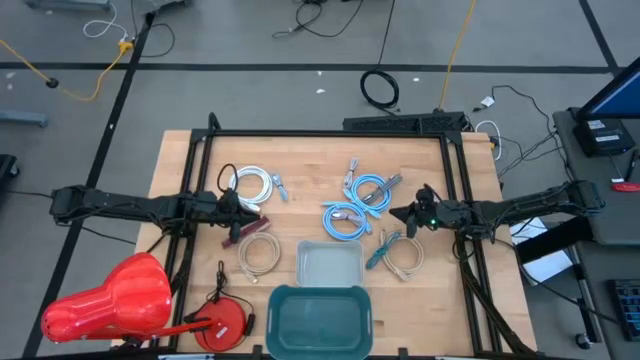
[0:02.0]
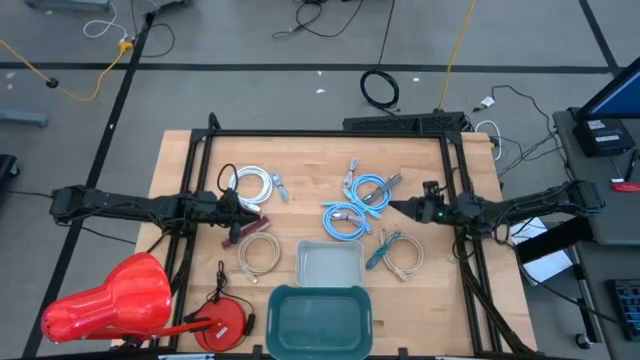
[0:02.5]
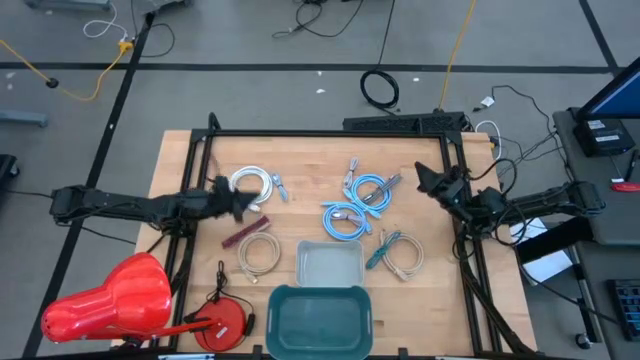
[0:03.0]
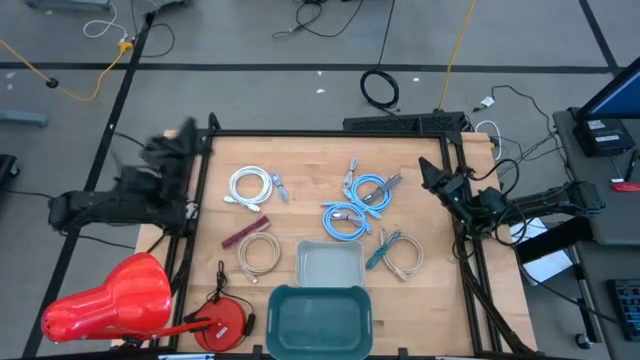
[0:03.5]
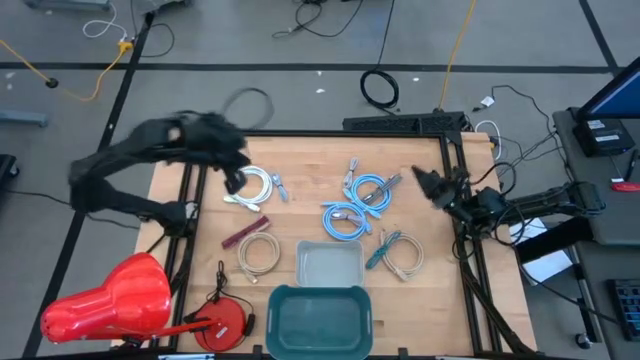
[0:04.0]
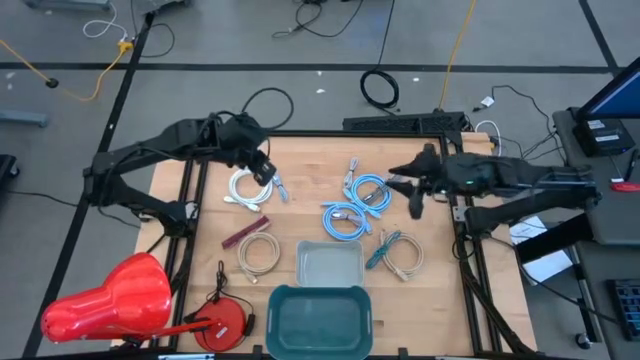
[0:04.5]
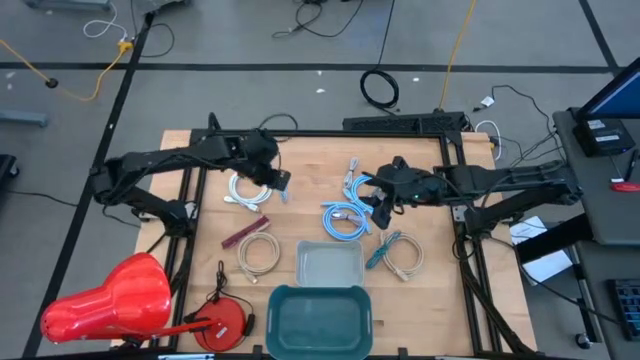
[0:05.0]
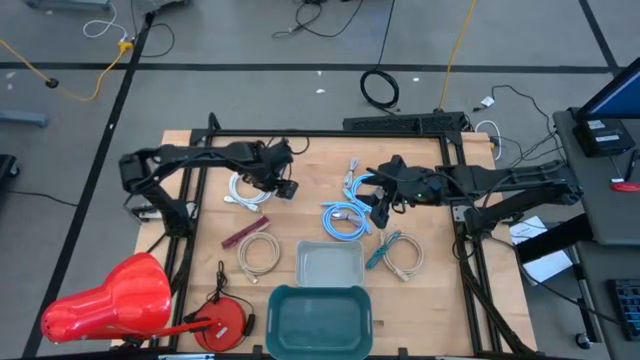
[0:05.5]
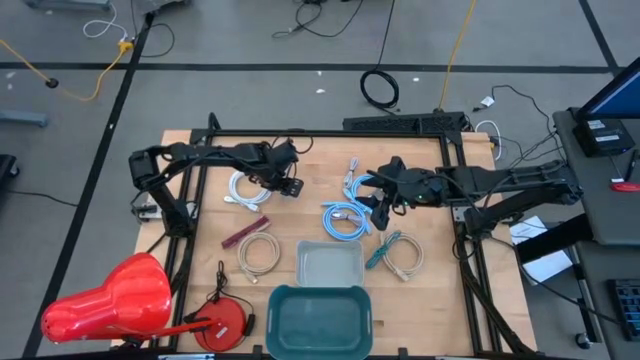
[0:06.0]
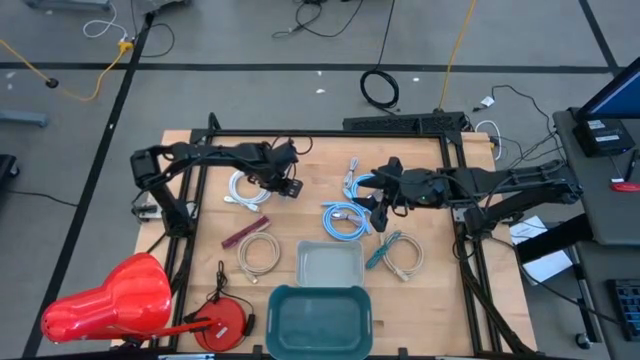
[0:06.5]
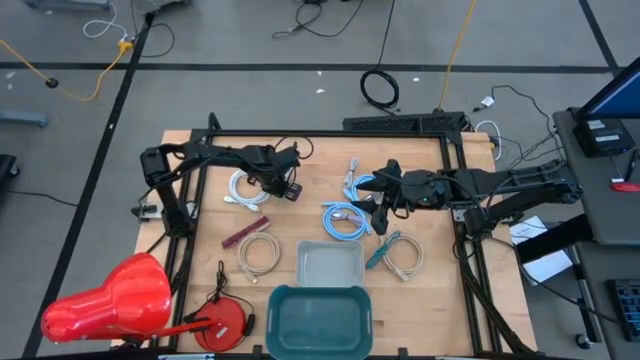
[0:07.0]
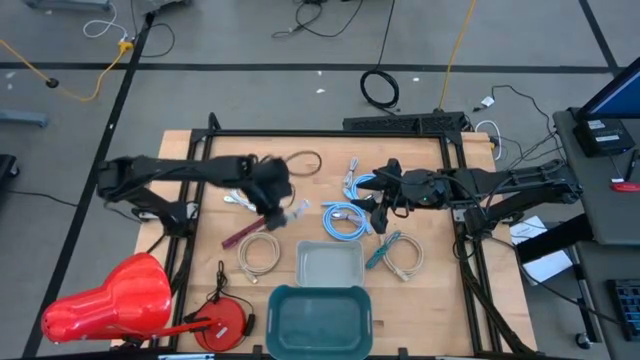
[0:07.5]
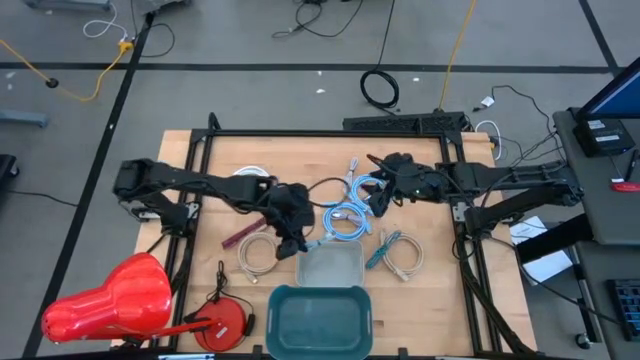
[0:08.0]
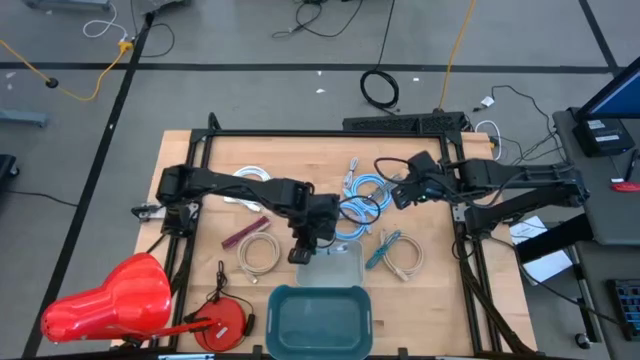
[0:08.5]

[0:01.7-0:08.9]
Task: Pick & Place USB Port
Put the light blue charger cable into the gray bin

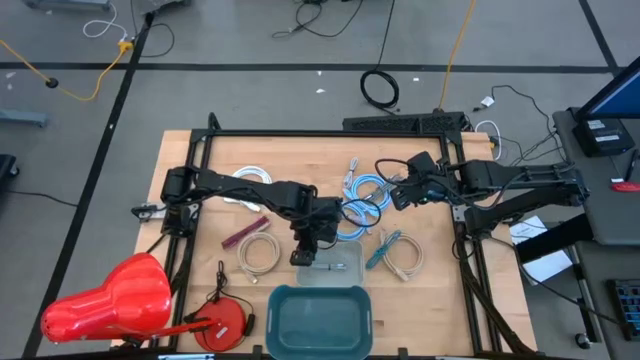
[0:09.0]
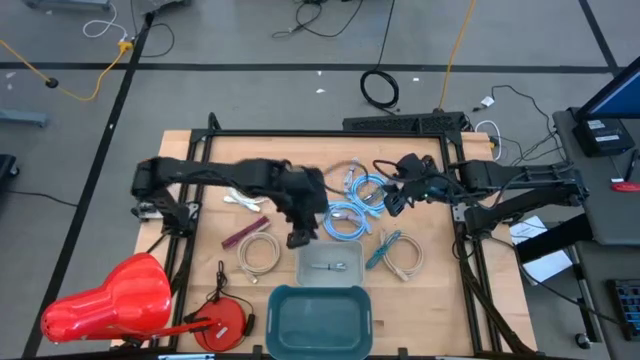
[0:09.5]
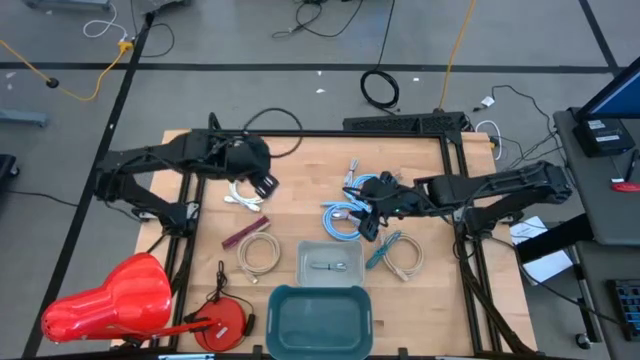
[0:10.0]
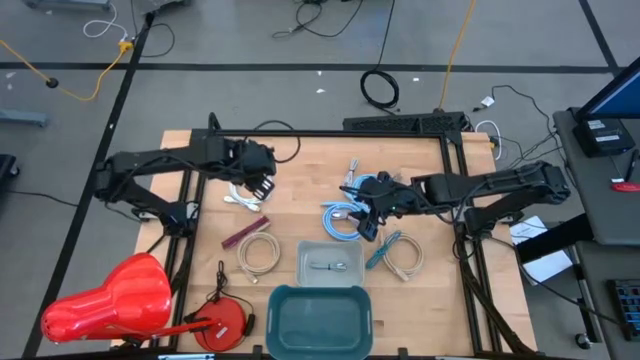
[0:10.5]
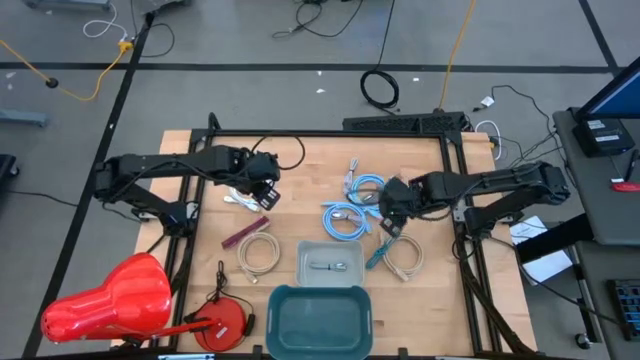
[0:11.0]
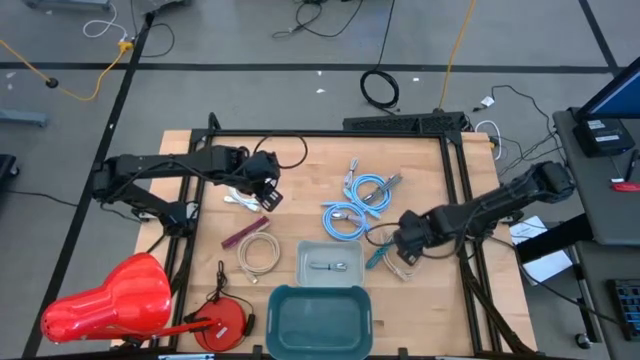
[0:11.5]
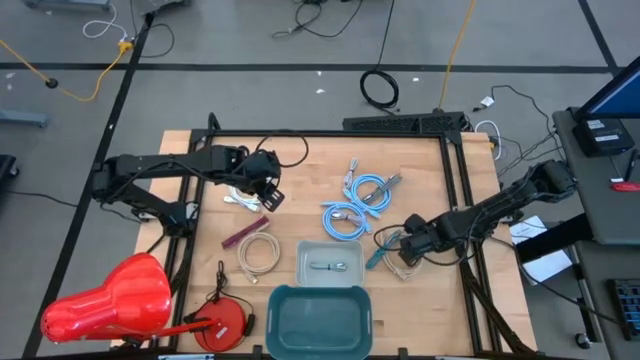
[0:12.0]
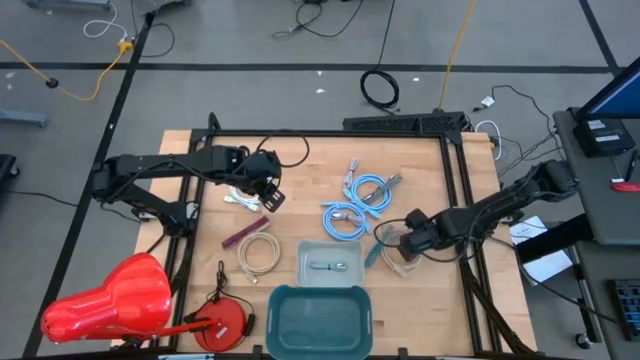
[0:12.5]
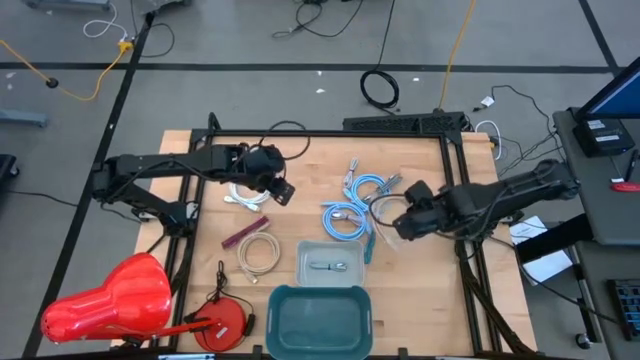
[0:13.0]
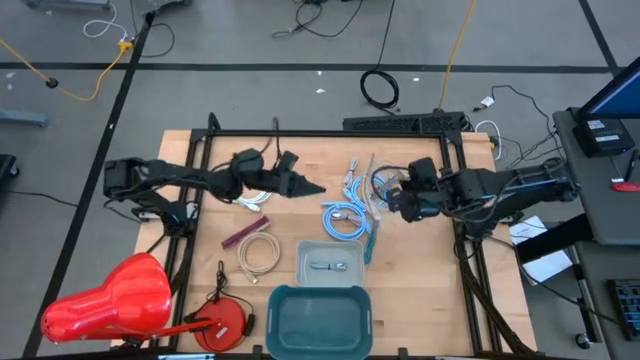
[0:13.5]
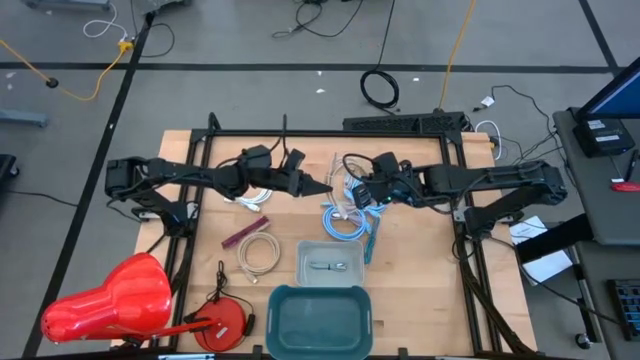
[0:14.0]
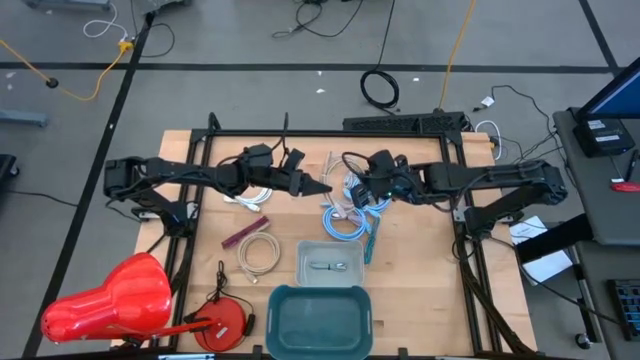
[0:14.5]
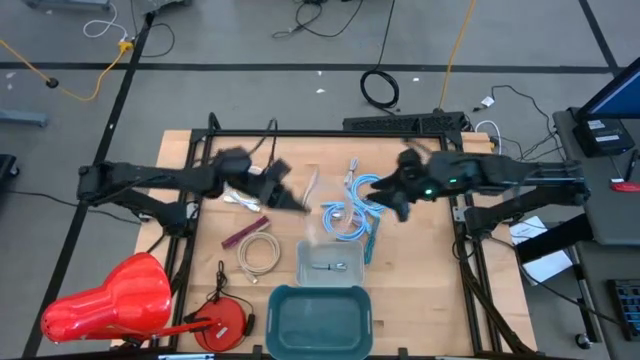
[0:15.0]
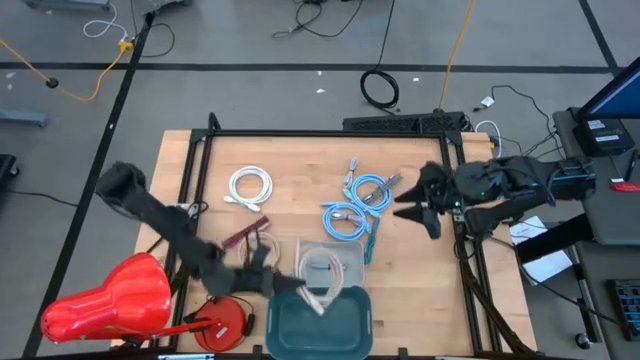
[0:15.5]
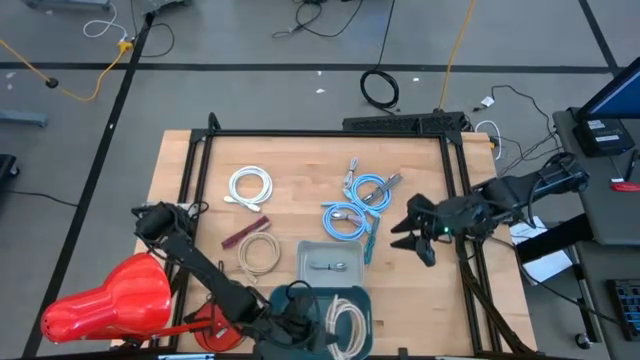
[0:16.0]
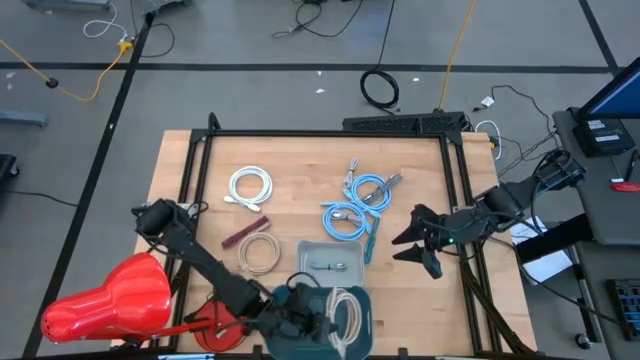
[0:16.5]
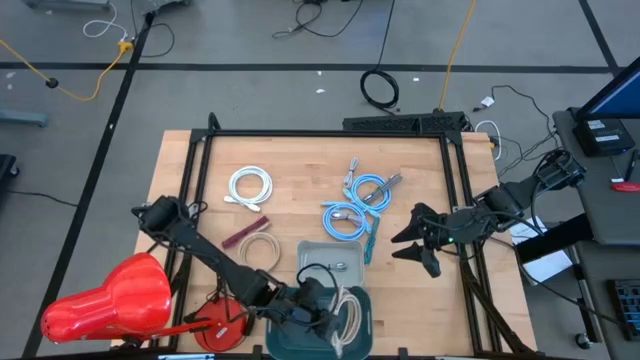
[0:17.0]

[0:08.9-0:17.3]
Put the right brown HDMI cable into the blue bin

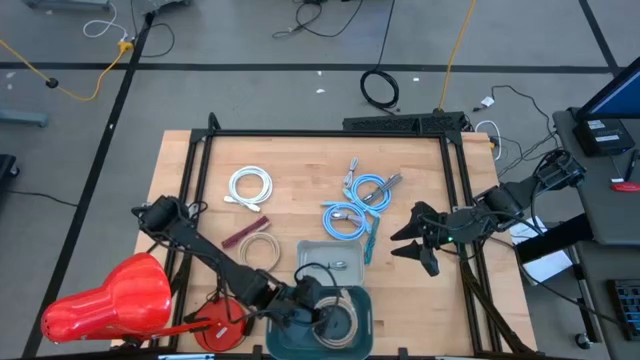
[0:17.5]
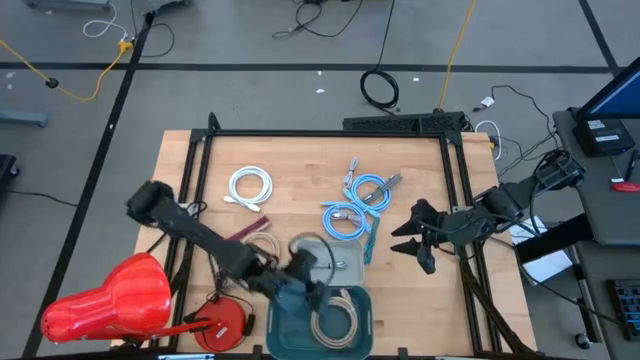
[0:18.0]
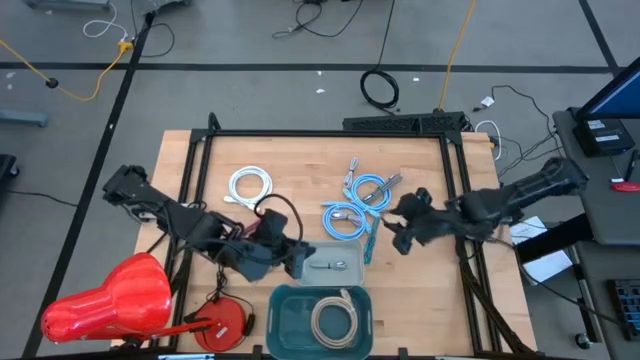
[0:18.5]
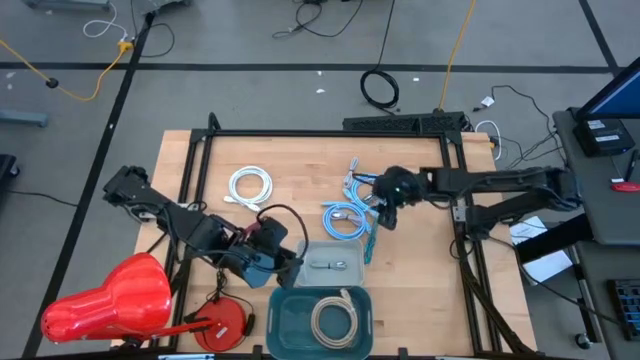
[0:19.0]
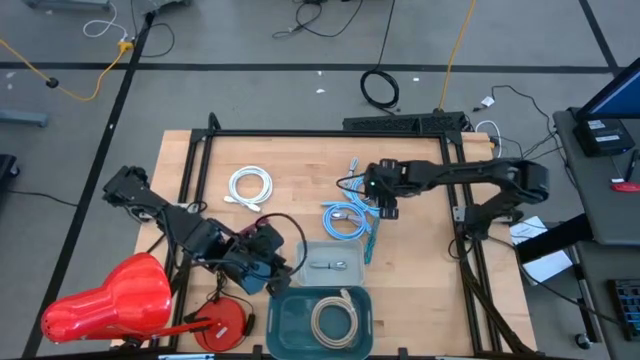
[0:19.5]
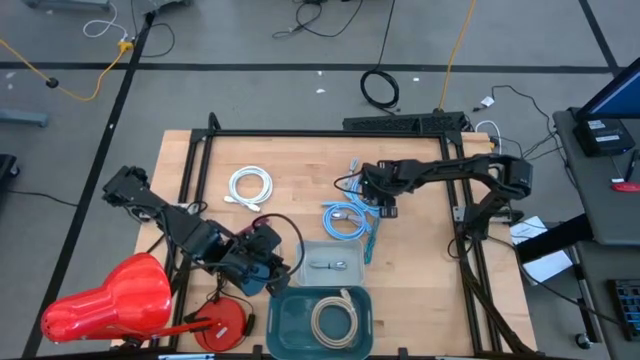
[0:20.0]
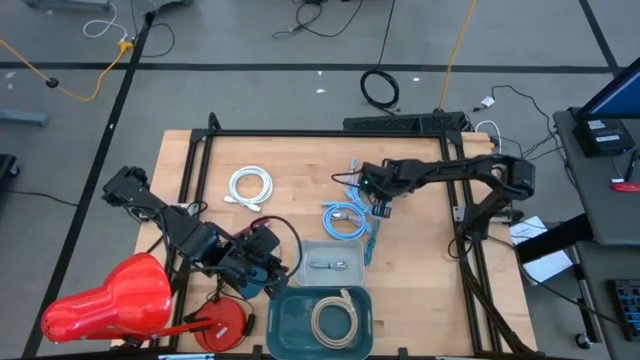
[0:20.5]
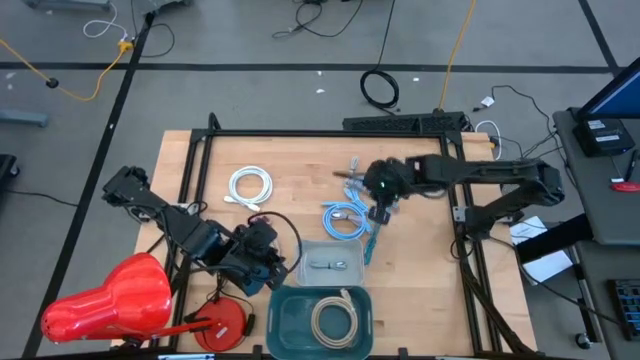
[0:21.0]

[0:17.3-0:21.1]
Put the black and white charger cable into the gray bin
